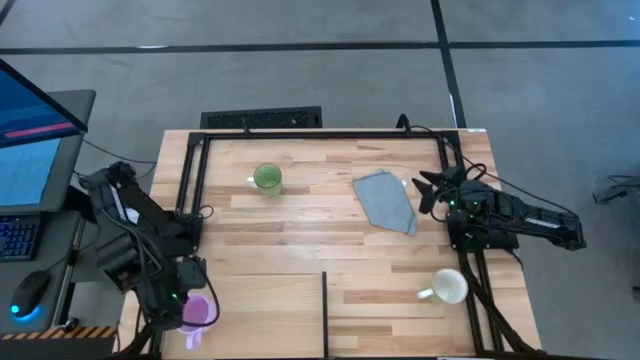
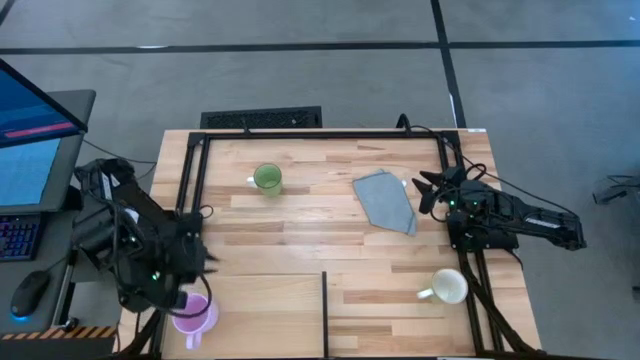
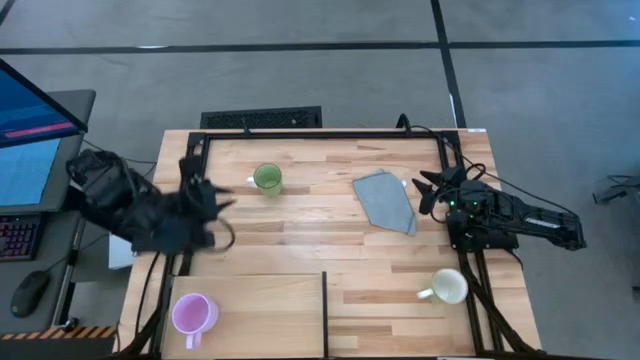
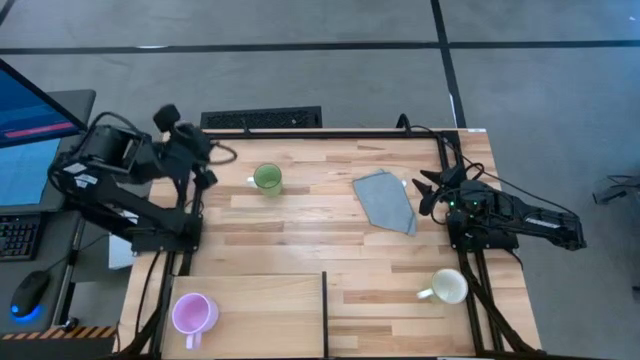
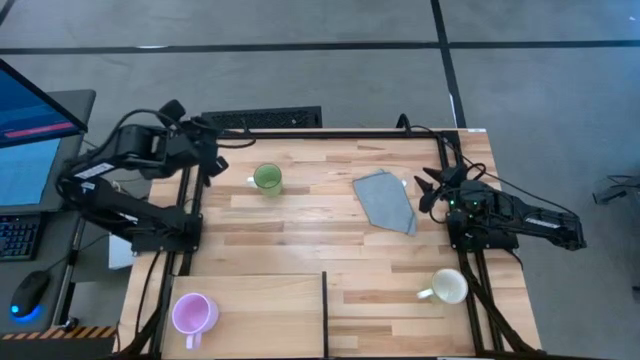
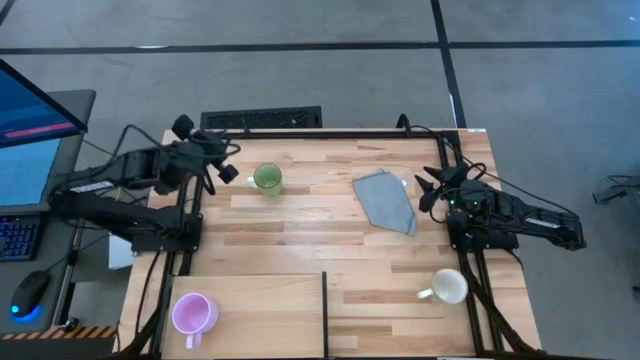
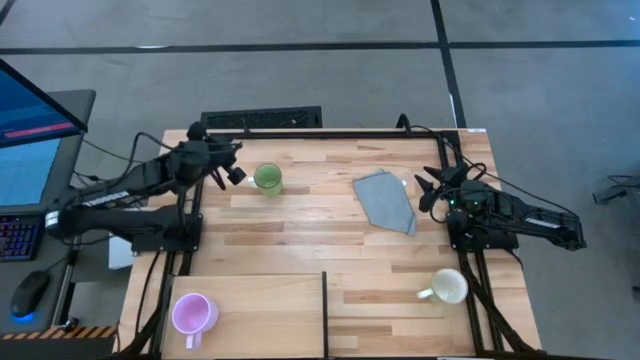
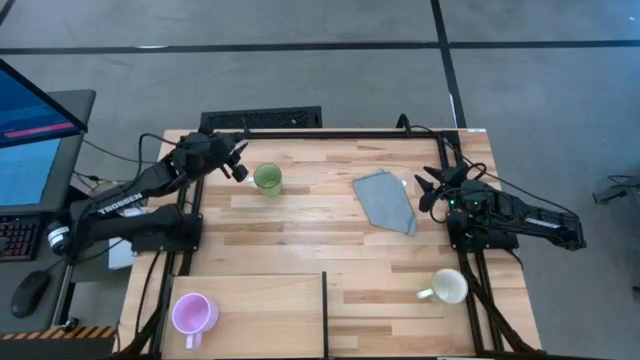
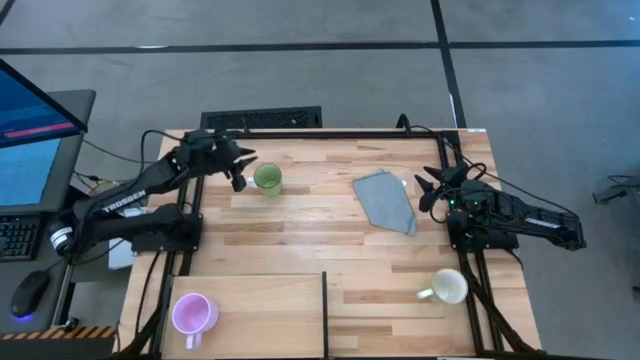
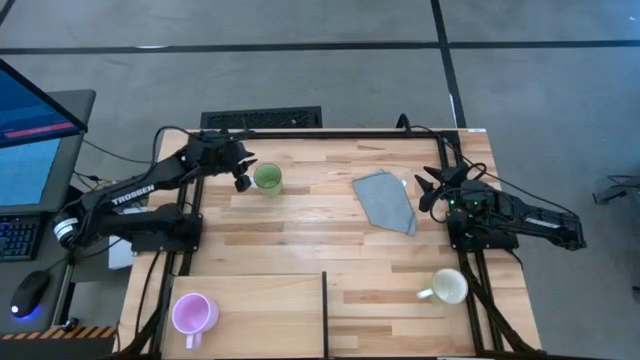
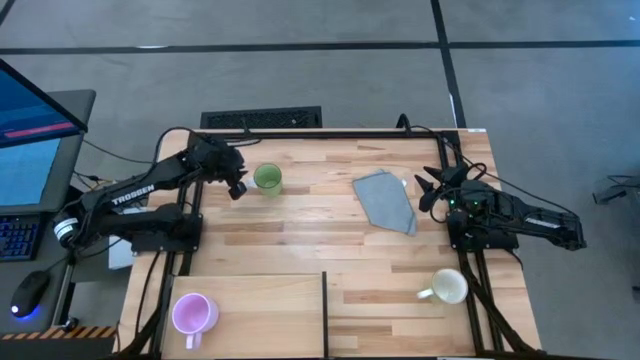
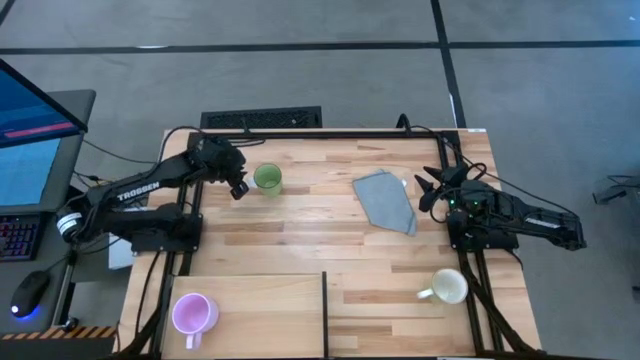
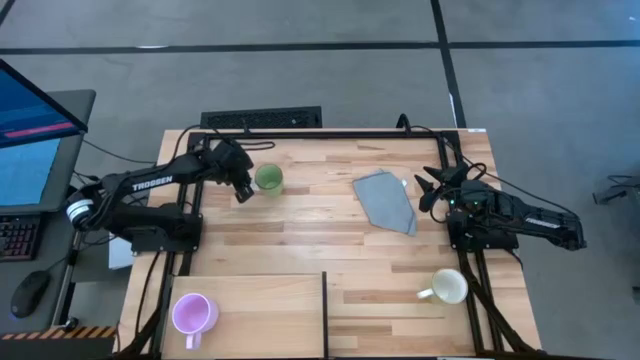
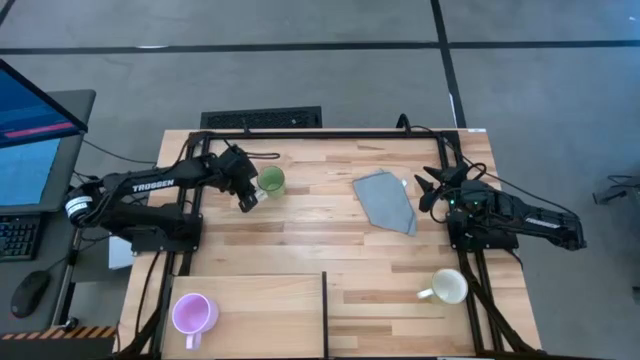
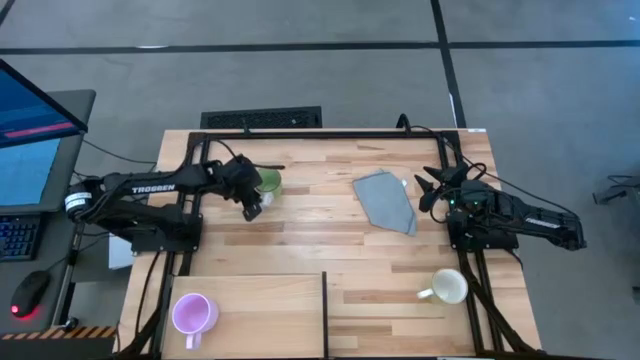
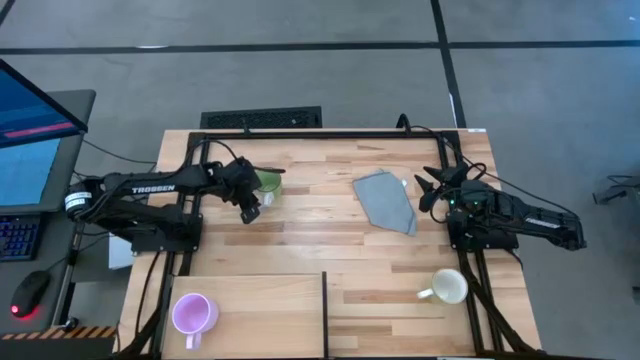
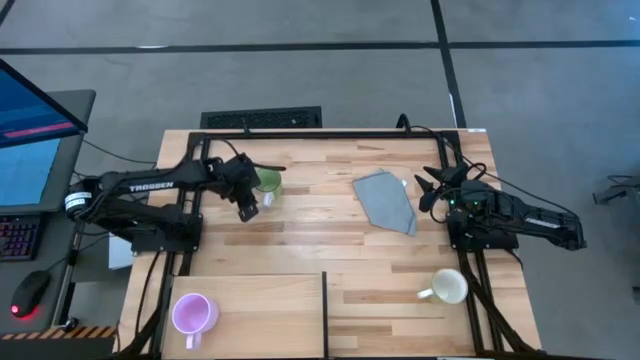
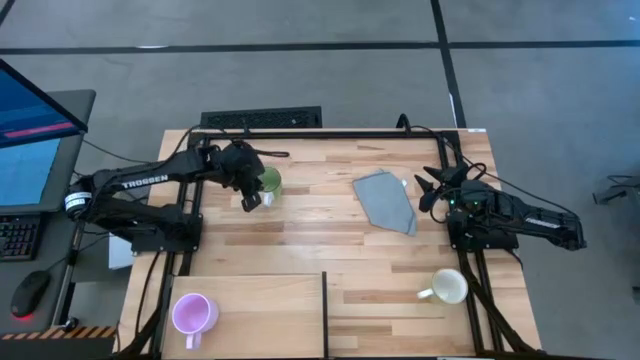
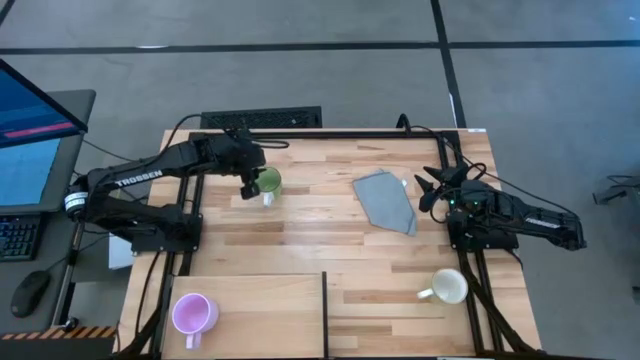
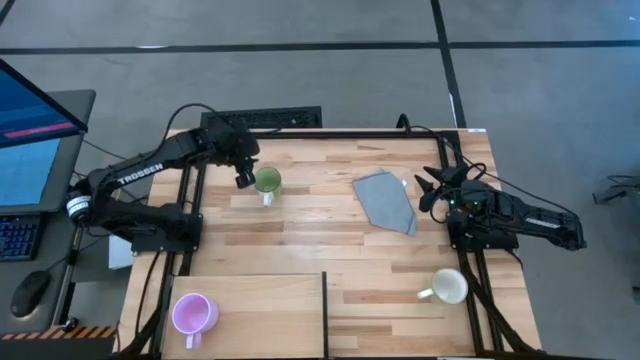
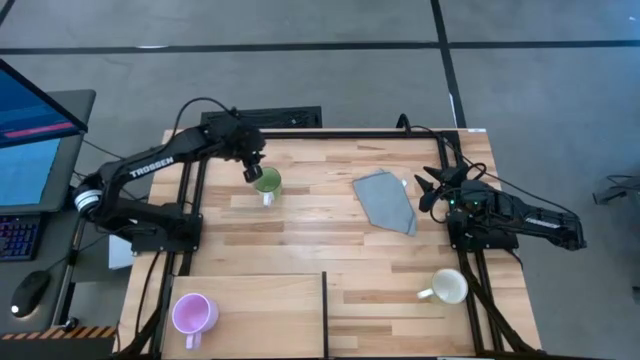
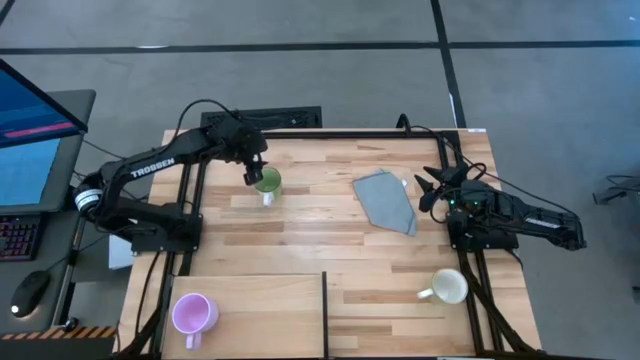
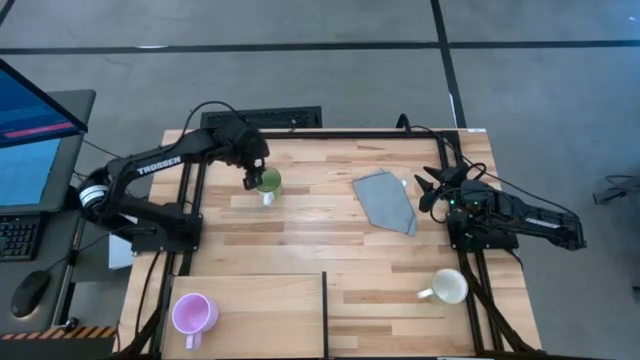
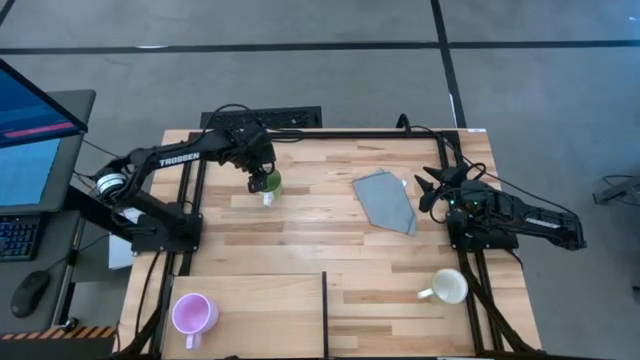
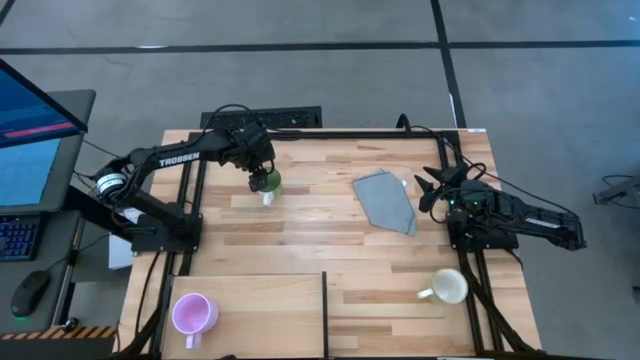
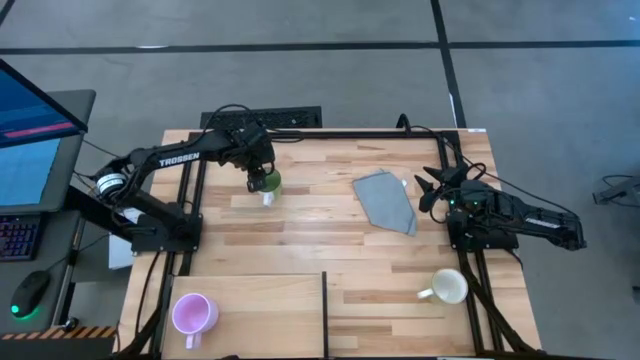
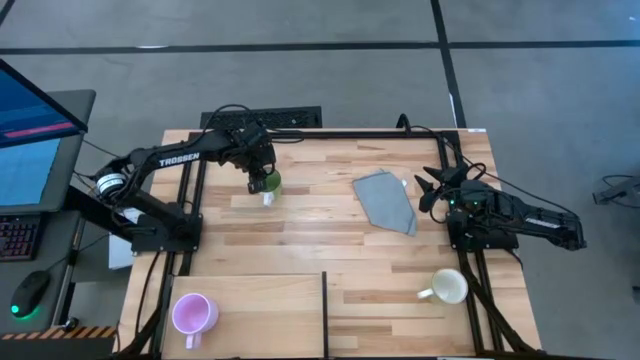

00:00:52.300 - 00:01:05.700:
Task: Stack small to large cups/mugs on shelf
Put the green mug on the shelf

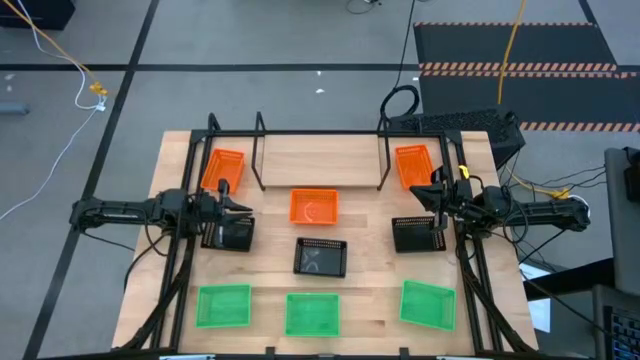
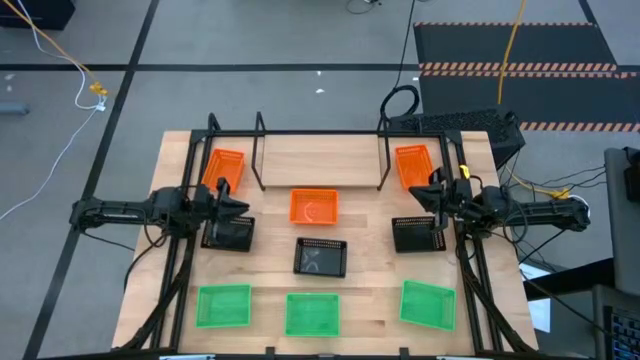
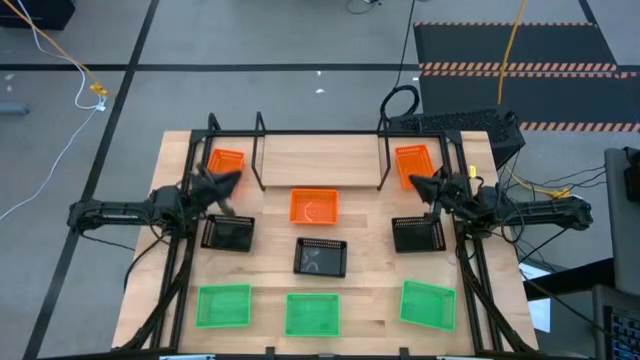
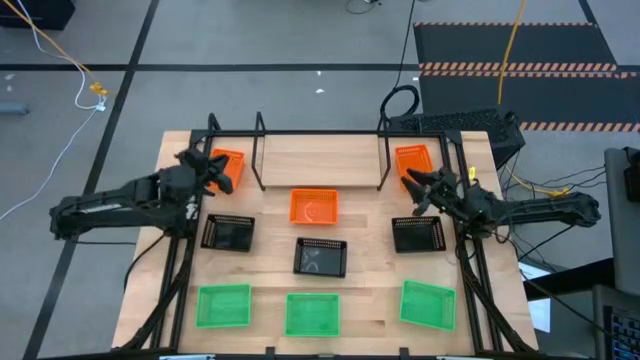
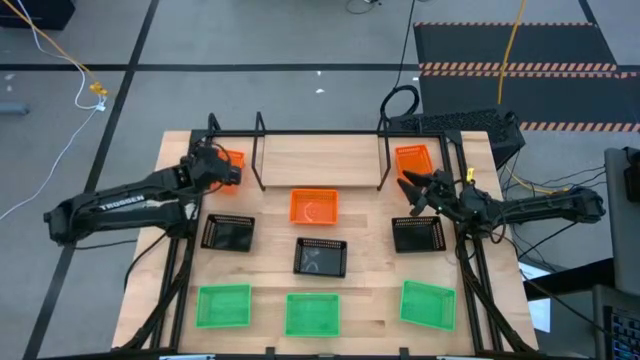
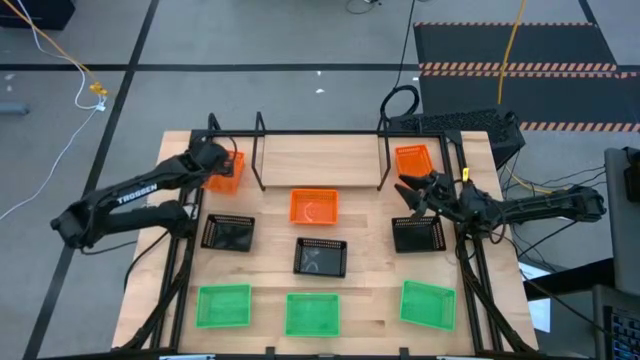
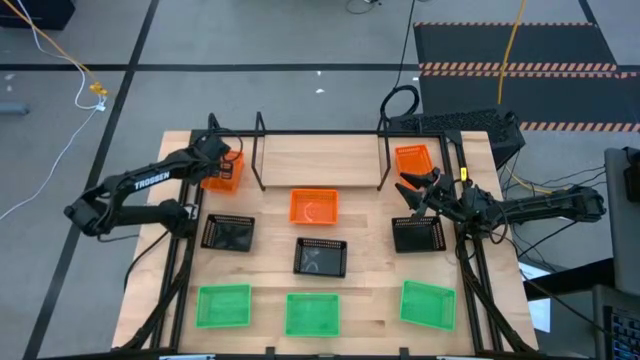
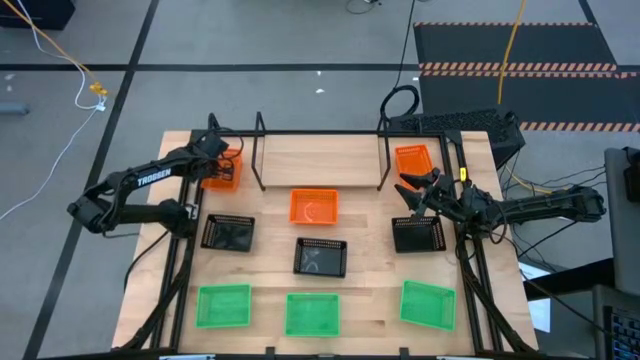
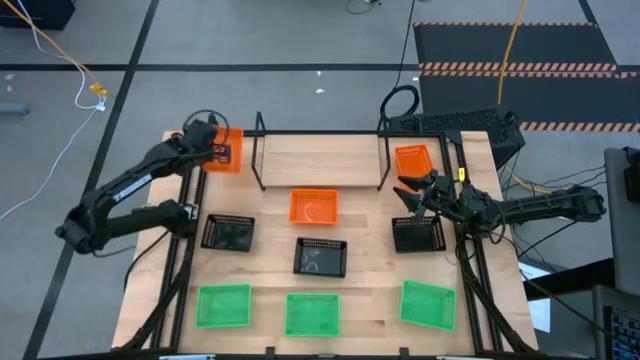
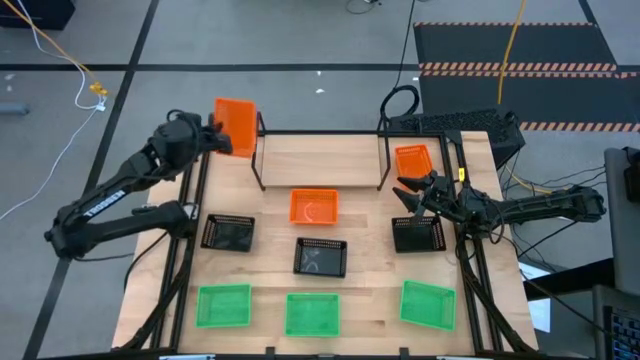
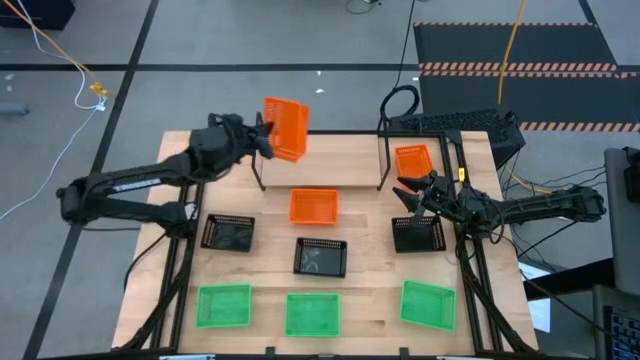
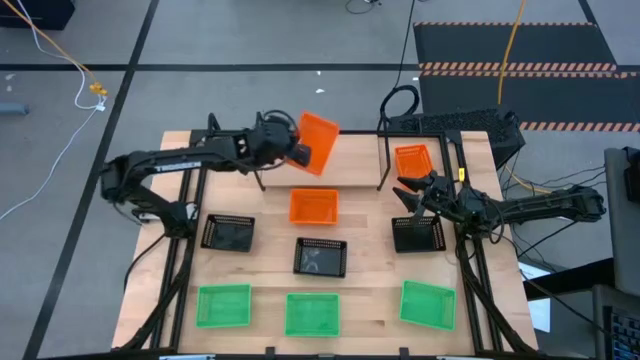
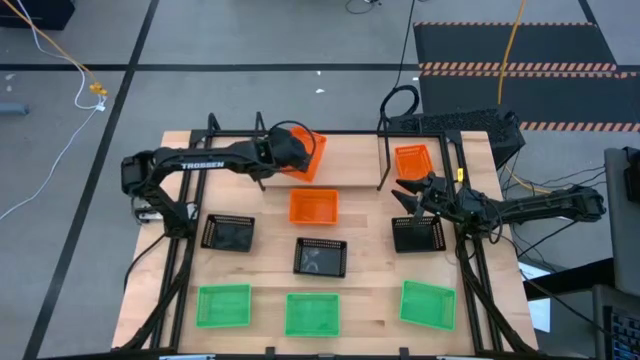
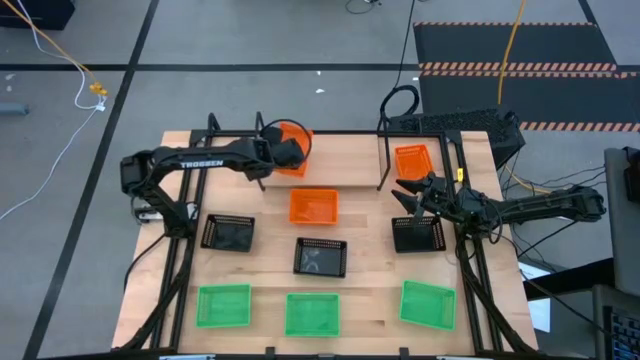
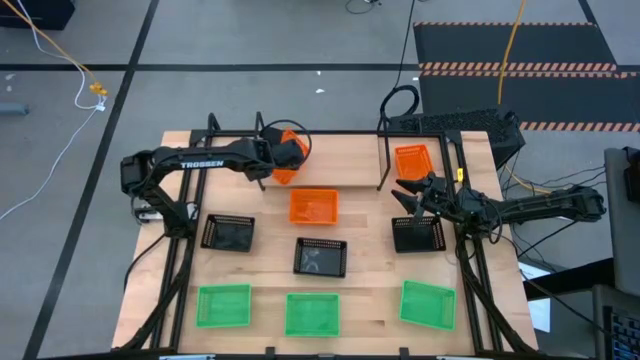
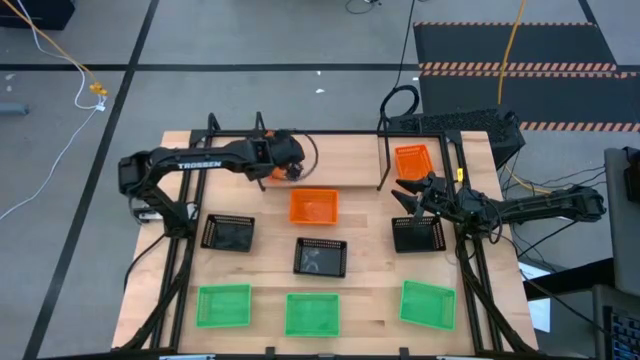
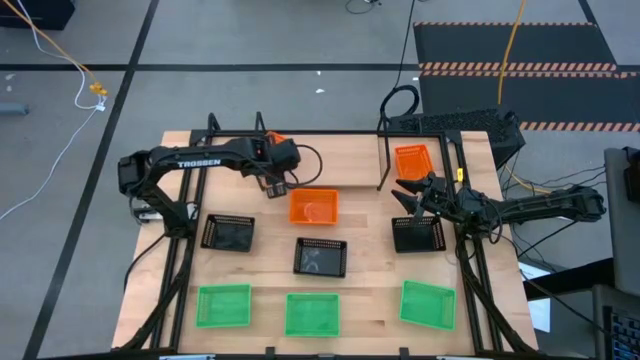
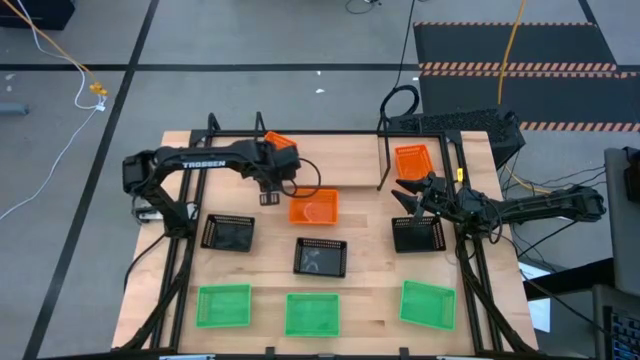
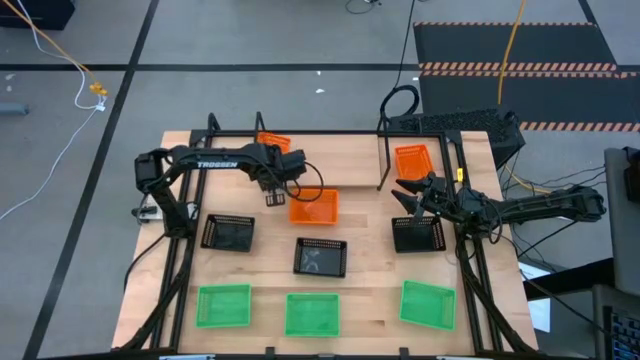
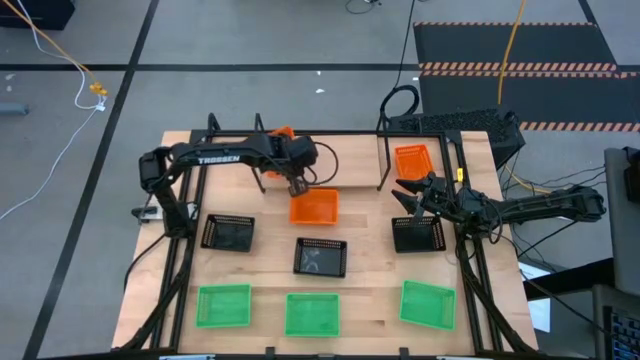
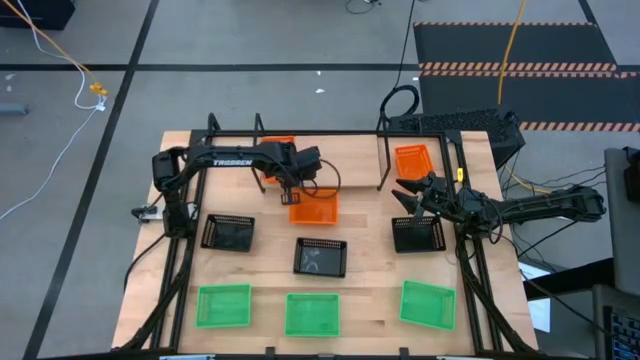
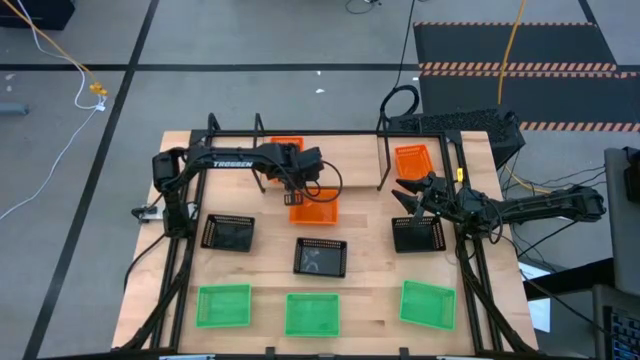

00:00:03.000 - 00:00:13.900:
Task: Stack baskets on shelf by color
Put the top left orange basket on the shelf
